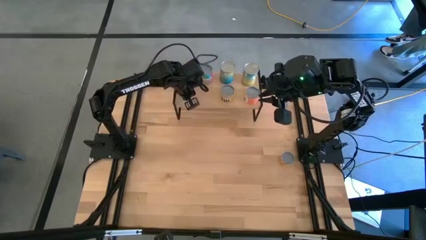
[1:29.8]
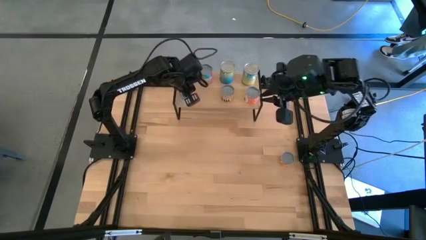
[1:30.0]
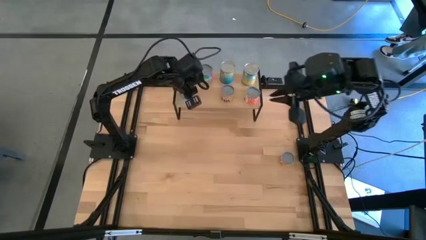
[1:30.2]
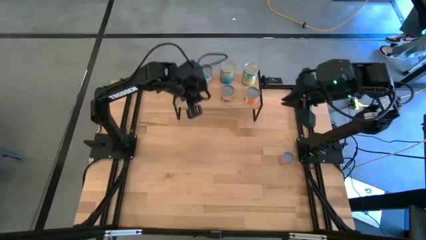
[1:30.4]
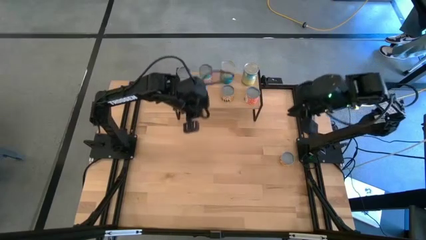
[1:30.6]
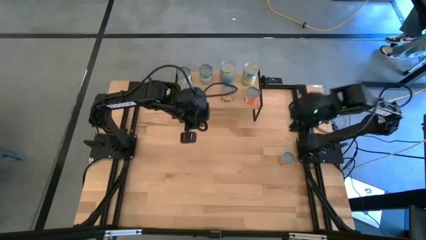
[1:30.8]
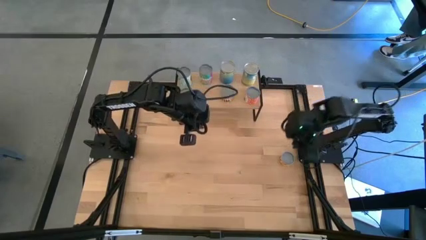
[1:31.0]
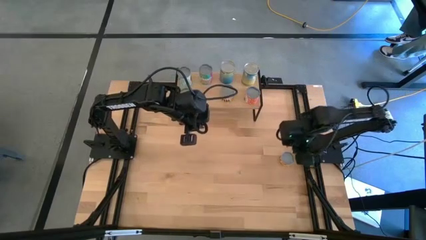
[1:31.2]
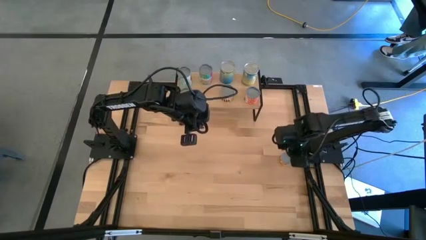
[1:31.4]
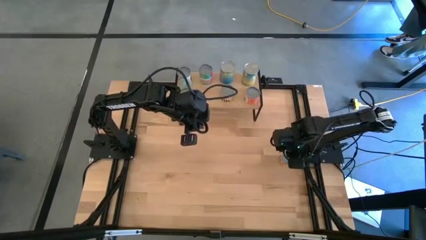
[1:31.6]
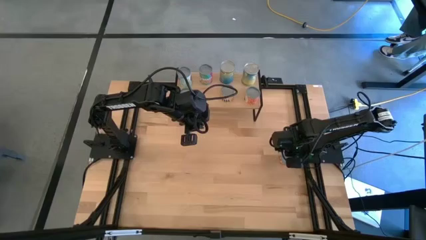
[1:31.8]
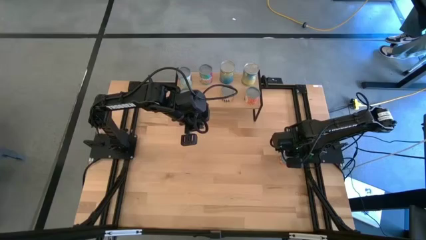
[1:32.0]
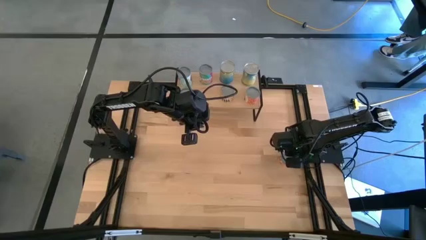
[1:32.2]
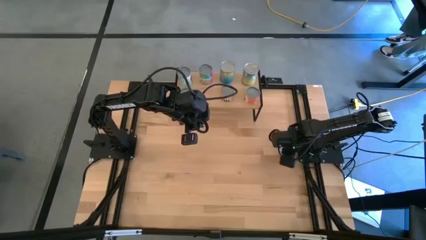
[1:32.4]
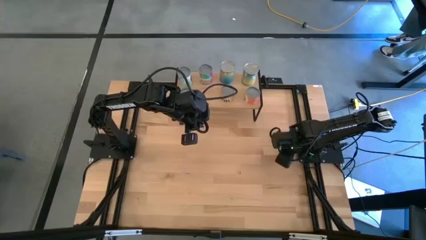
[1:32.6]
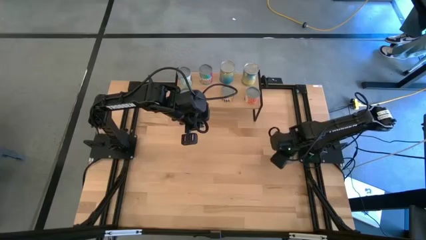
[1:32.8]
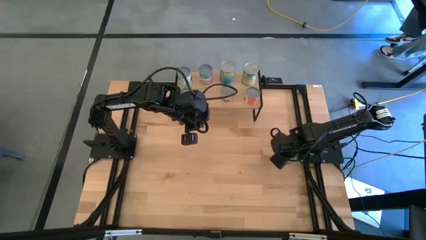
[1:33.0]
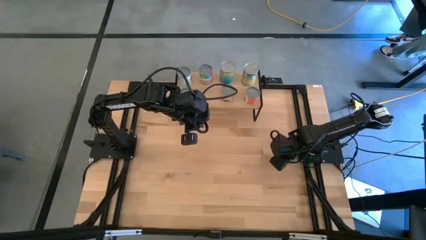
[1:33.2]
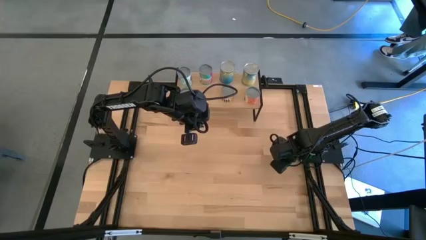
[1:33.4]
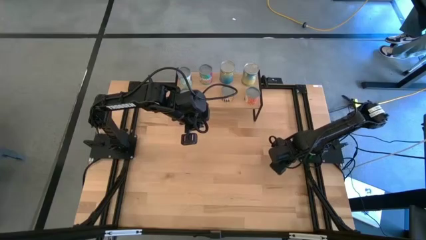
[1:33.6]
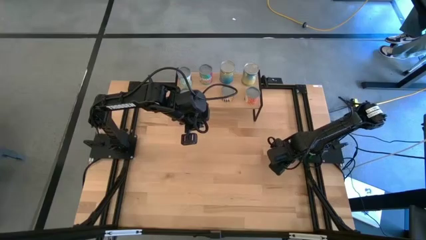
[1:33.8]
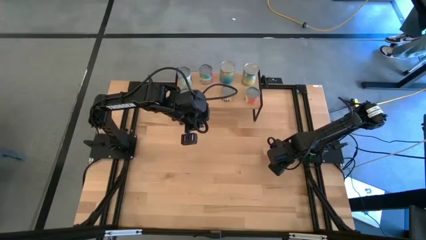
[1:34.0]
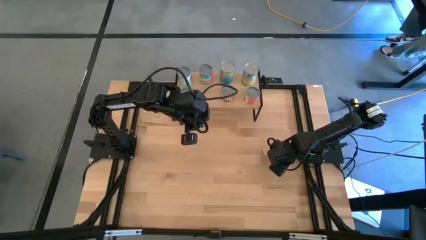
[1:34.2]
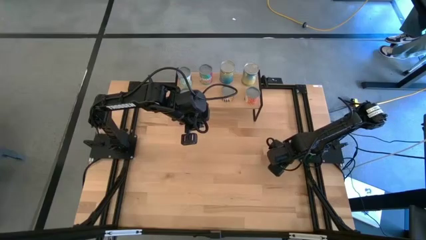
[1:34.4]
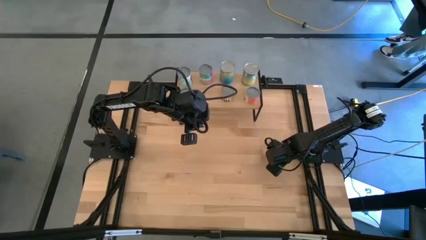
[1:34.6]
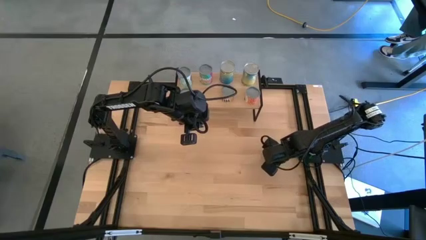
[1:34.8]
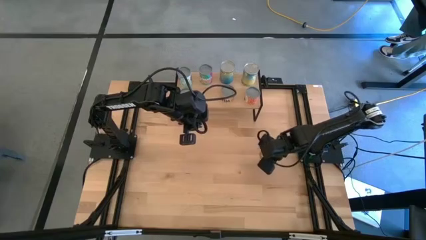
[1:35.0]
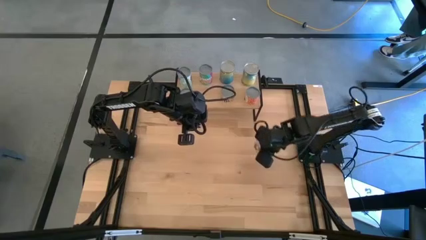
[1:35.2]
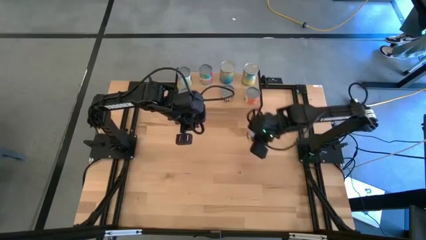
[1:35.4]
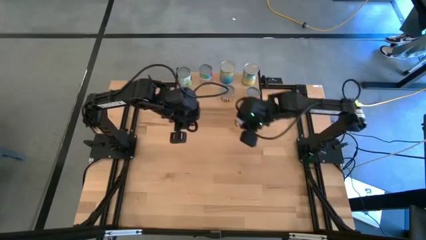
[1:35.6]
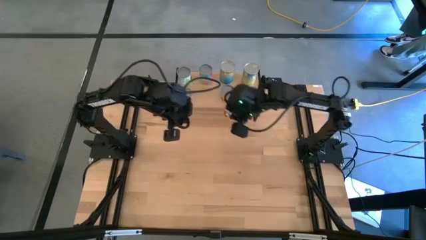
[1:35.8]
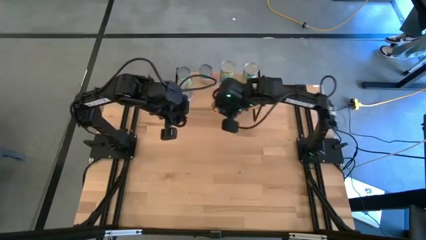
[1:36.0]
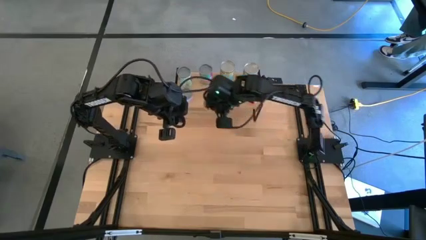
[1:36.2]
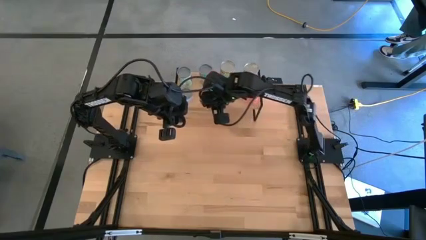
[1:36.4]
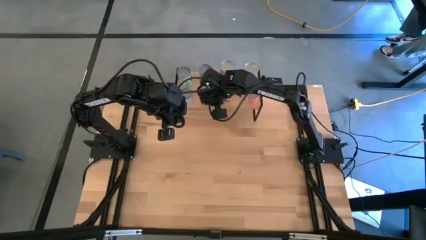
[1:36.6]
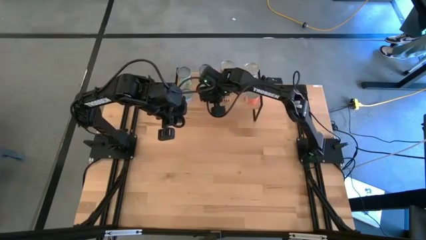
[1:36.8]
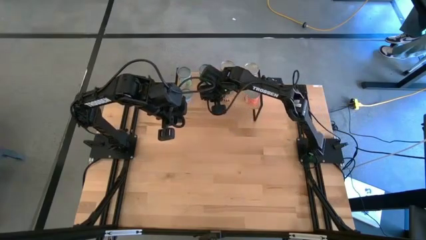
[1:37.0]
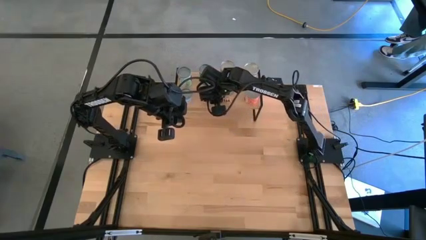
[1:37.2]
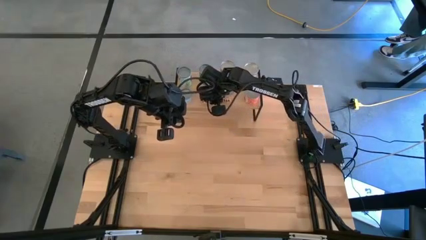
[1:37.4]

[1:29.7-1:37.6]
Task: Pick and place cans onto a shelf
Put the canned pineapple rings on the shelf

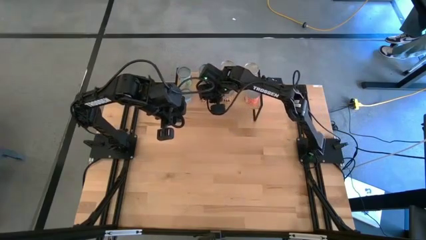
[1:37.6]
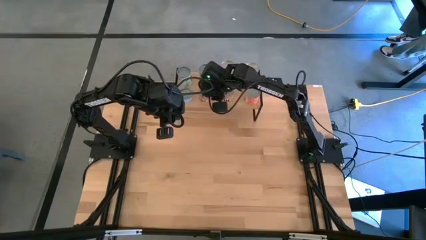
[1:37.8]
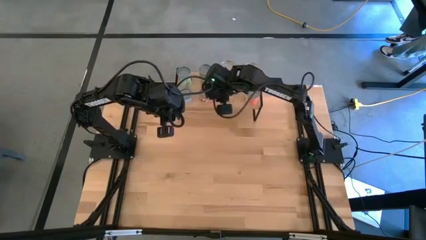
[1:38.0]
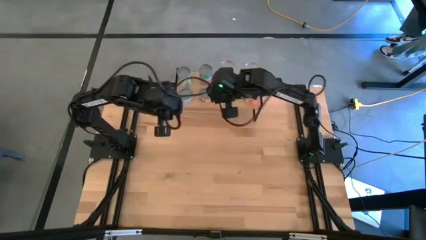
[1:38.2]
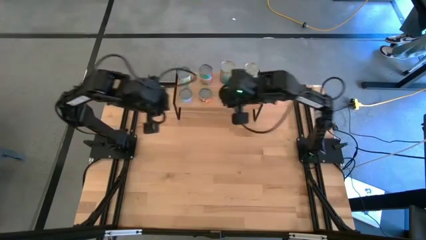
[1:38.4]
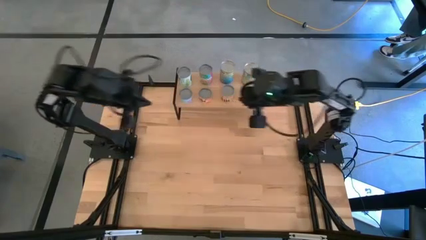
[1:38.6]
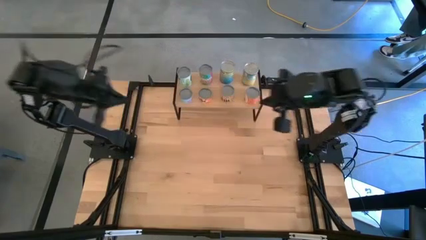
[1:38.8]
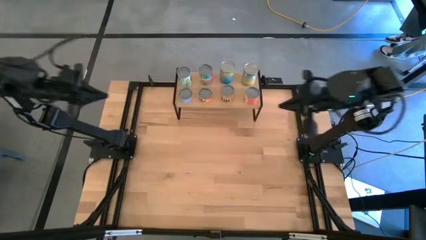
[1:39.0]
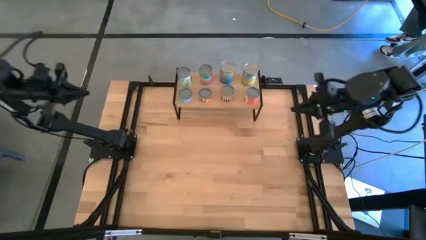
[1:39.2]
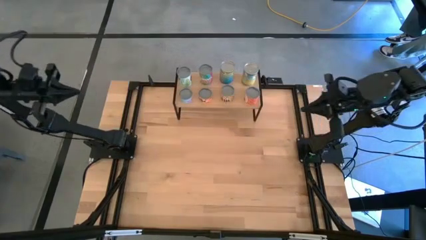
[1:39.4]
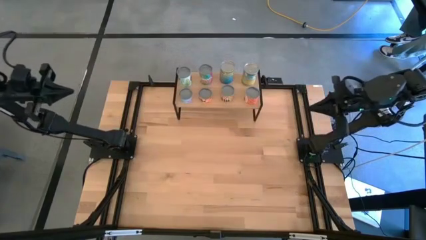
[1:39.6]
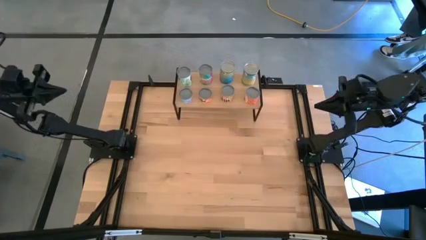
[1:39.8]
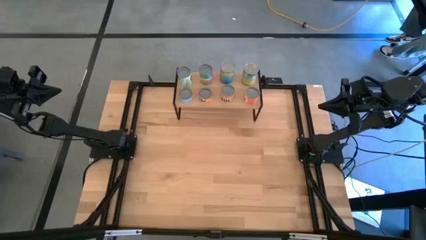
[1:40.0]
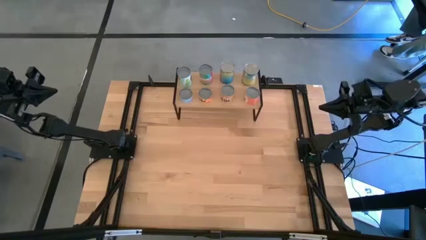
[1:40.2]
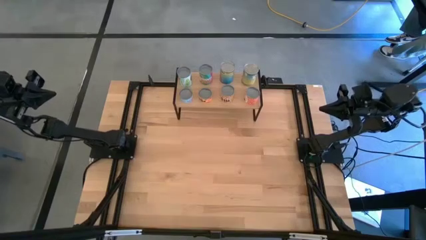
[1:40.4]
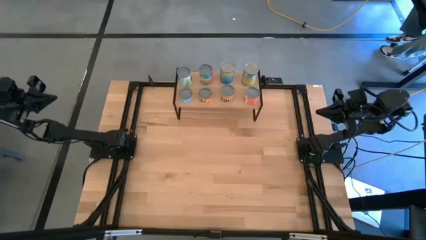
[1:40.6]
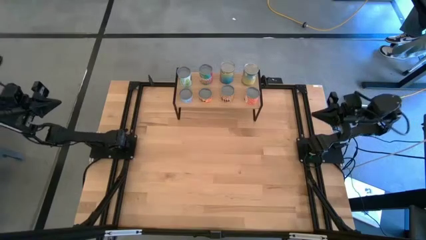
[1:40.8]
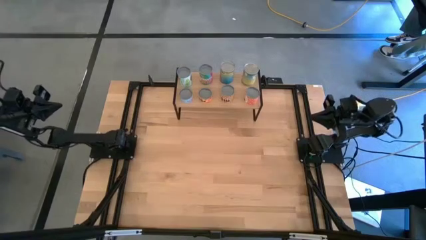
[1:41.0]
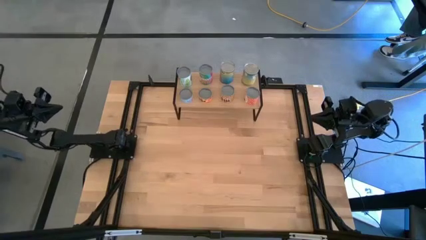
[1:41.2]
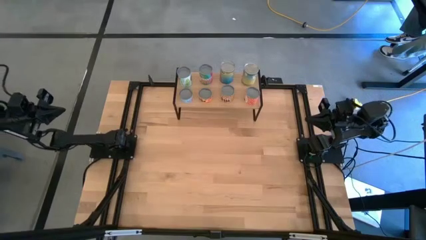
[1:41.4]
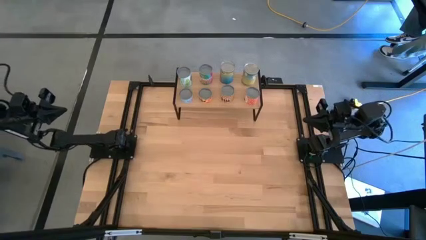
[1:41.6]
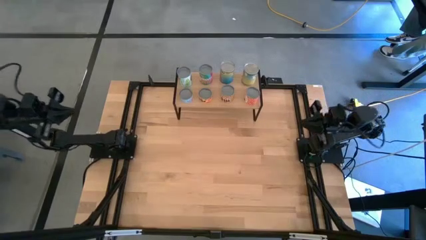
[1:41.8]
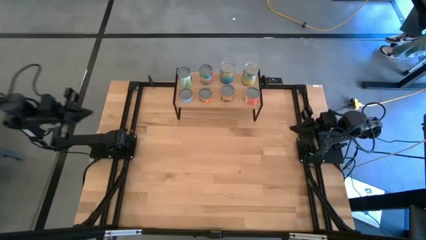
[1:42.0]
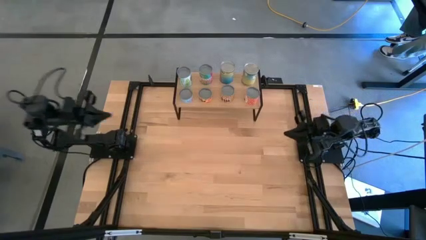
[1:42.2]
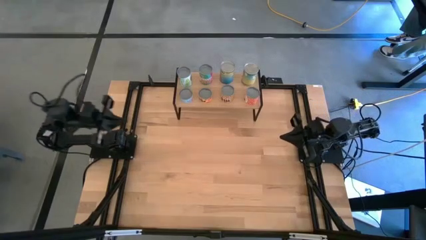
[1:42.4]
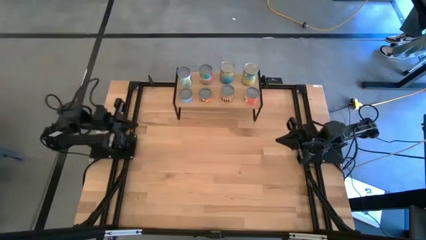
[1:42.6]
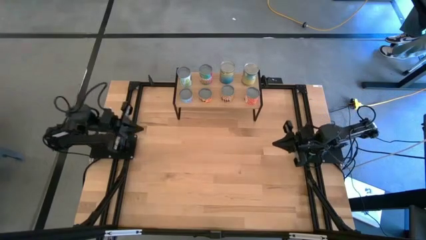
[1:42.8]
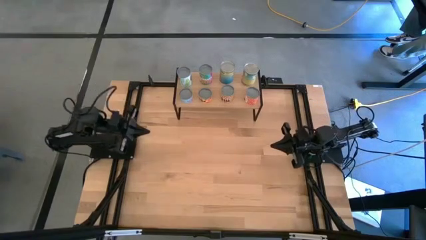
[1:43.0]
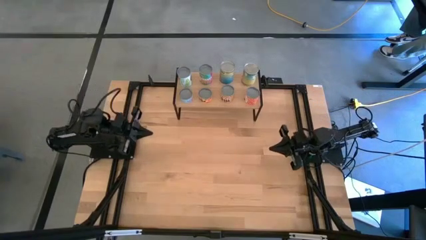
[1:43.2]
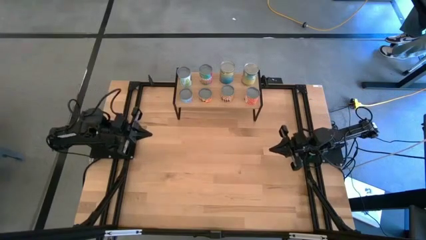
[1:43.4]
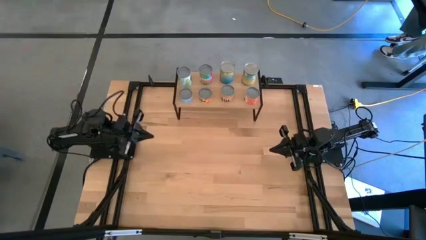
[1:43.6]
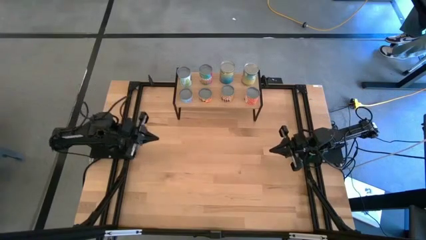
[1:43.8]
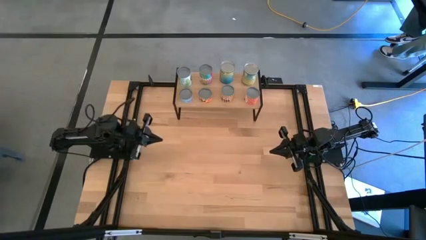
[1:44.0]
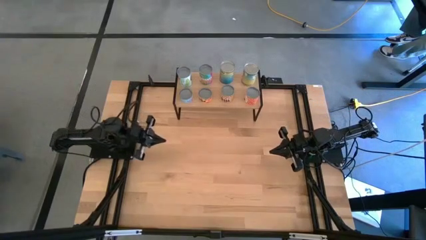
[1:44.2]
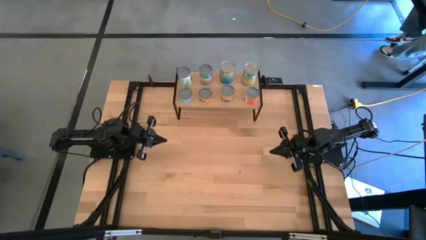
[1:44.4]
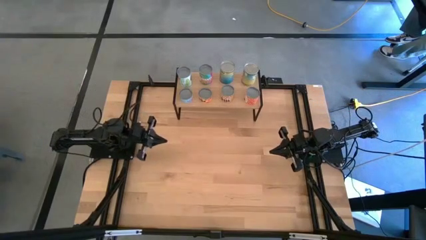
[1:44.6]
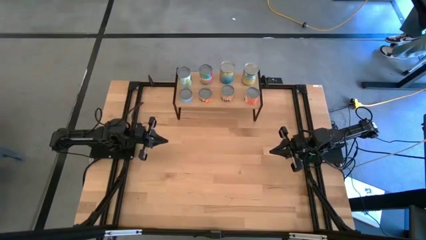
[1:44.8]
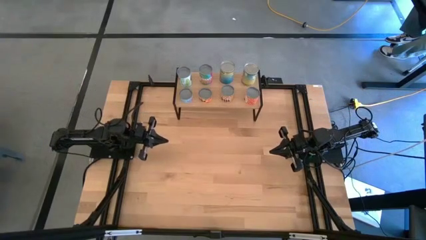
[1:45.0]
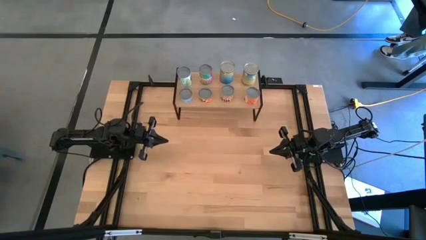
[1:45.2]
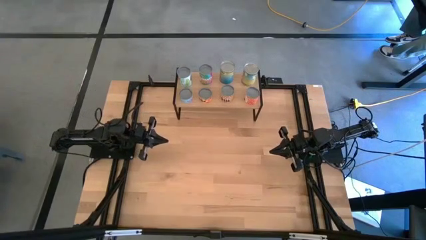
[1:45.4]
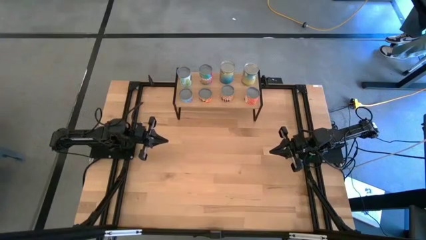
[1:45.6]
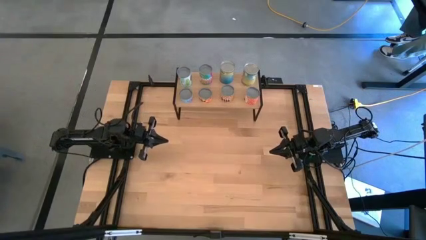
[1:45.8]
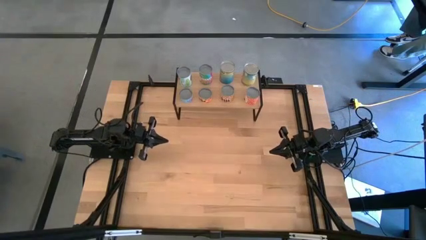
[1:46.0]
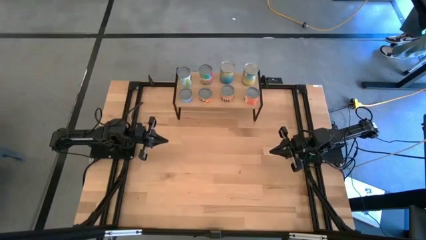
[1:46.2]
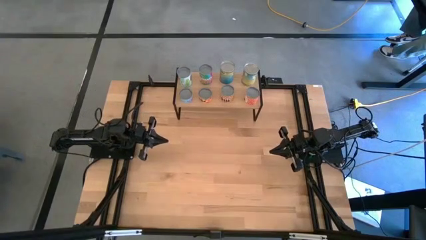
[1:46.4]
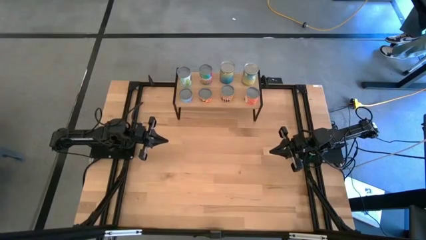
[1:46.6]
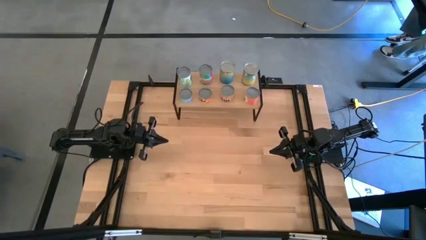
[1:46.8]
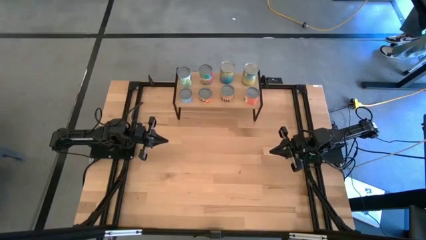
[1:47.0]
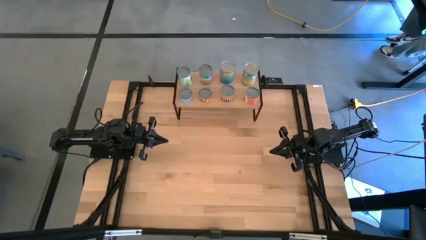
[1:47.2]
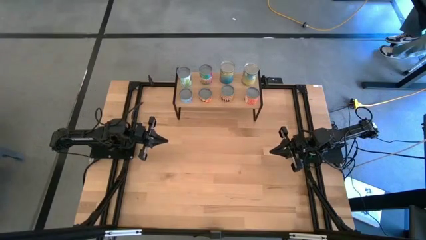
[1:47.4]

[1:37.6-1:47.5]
Return to Home Position
